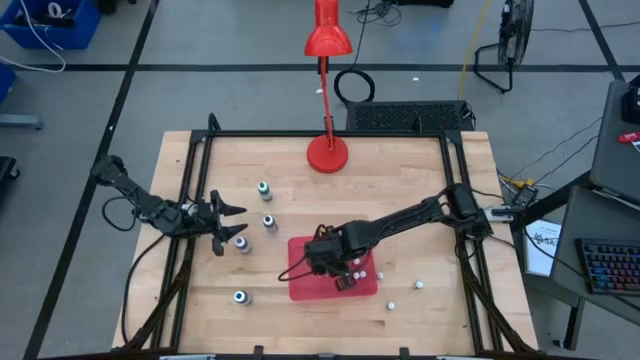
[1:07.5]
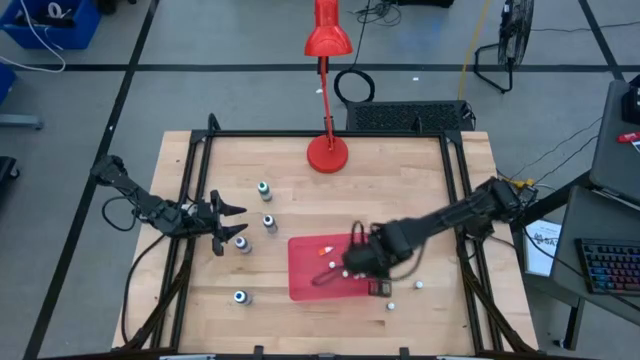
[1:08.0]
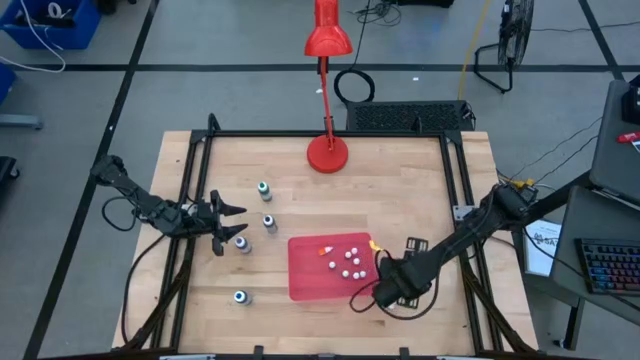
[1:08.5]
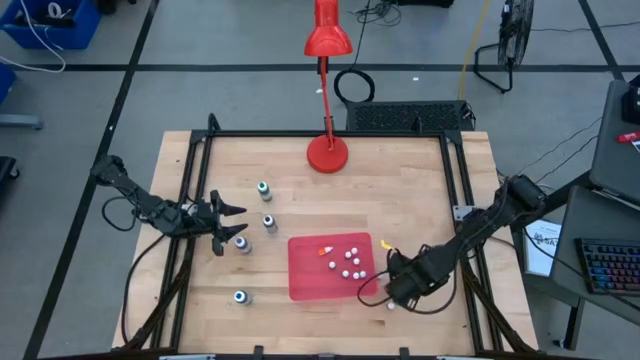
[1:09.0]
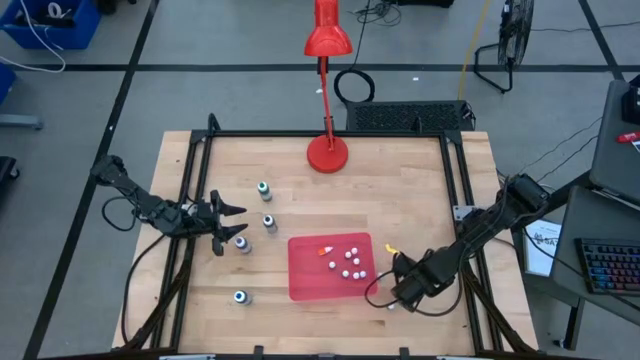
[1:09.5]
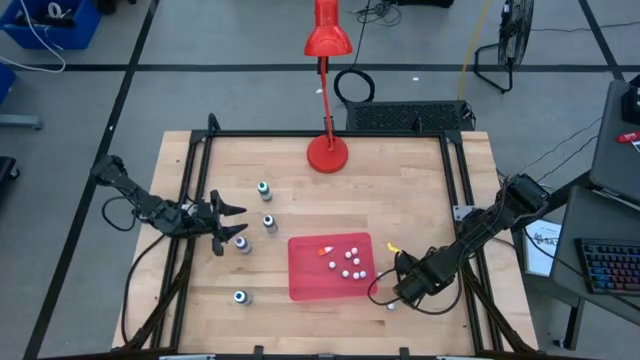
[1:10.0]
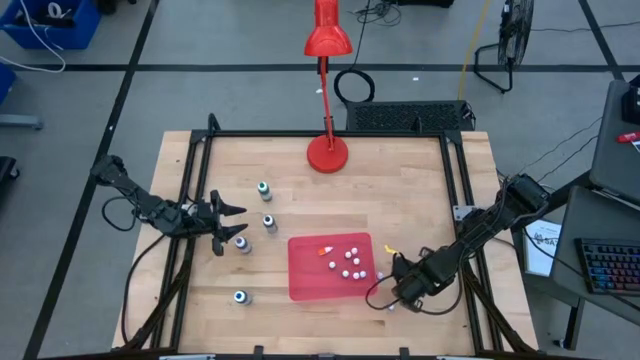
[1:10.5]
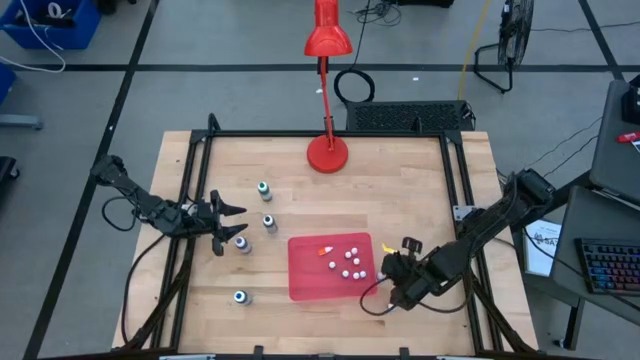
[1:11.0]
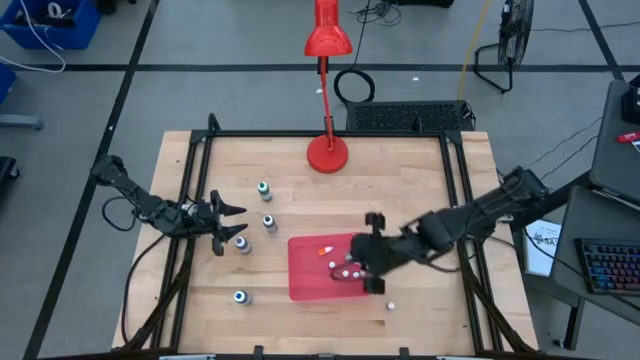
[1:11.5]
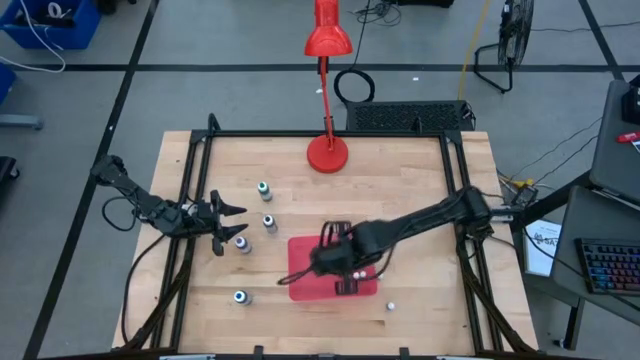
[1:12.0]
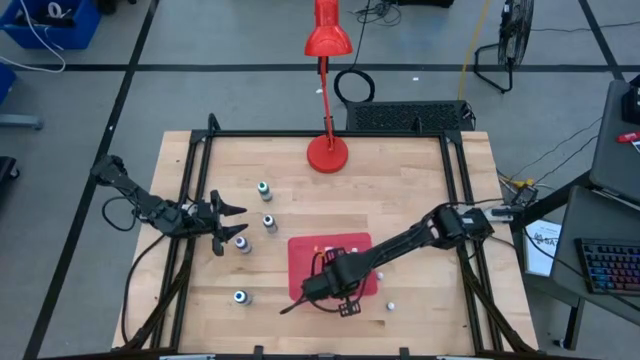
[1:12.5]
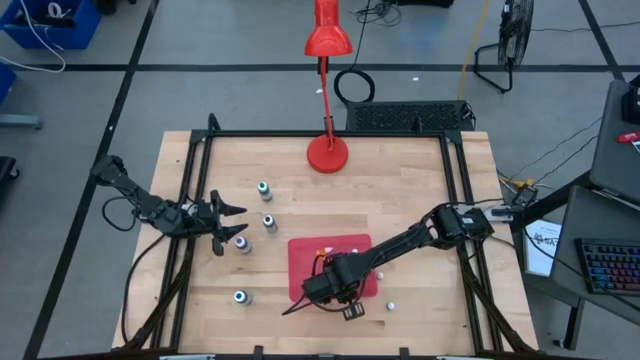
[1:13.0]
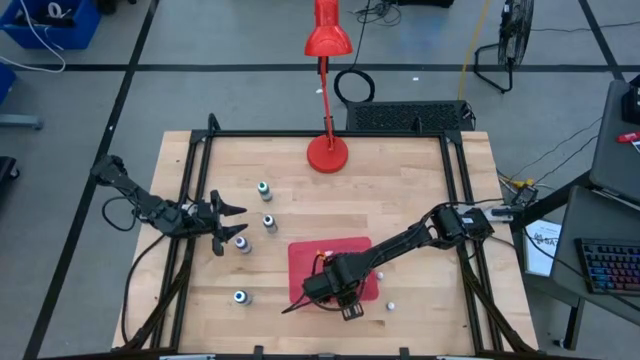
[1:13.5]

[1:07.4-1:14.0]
Task: Pick & Place food coloring
Put the small purple food coloring bottle into the pink container

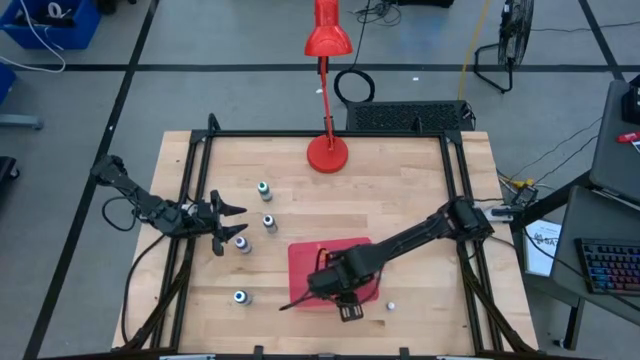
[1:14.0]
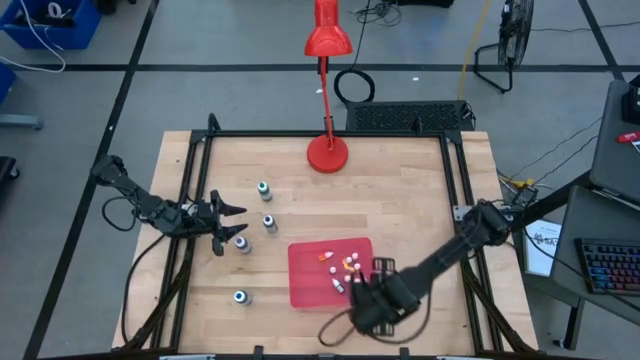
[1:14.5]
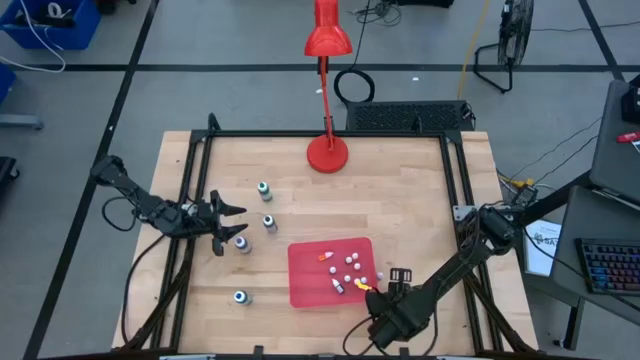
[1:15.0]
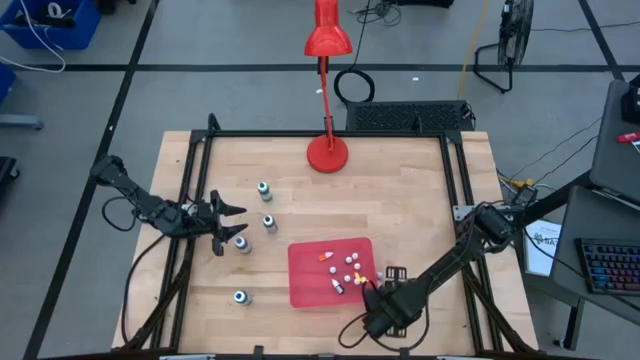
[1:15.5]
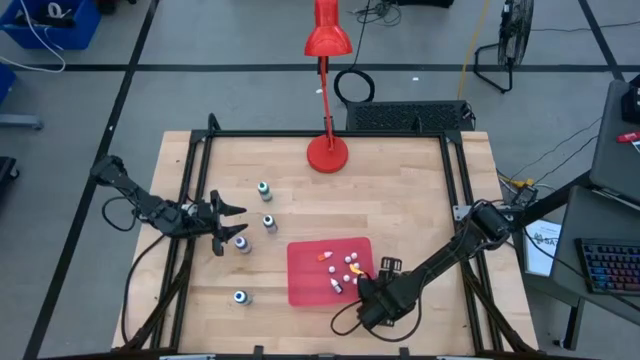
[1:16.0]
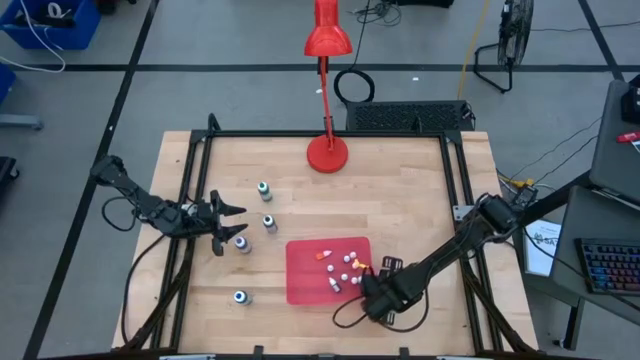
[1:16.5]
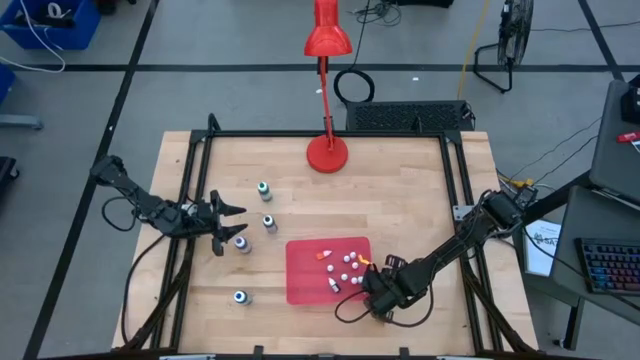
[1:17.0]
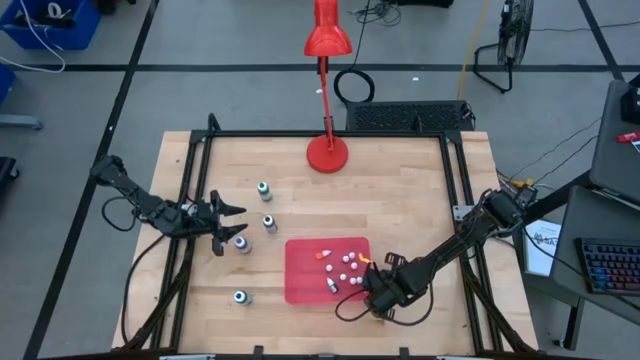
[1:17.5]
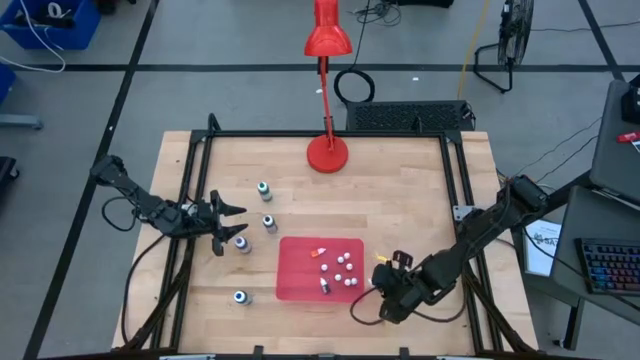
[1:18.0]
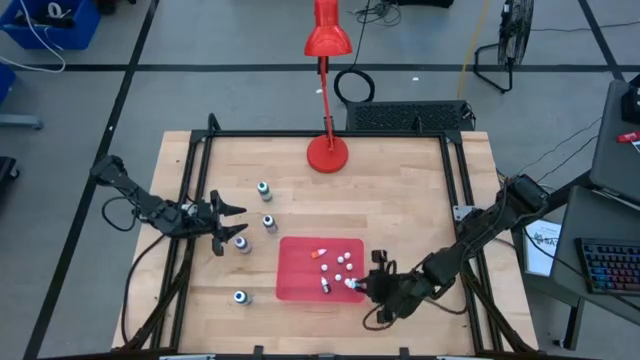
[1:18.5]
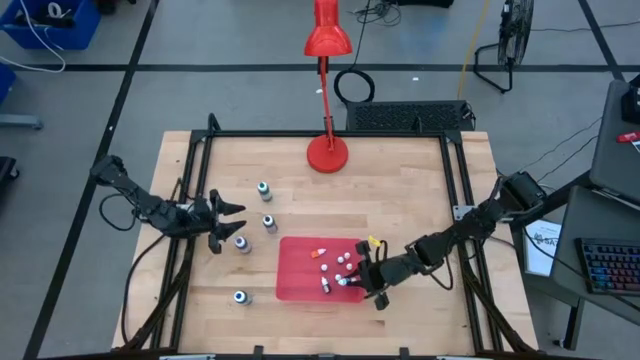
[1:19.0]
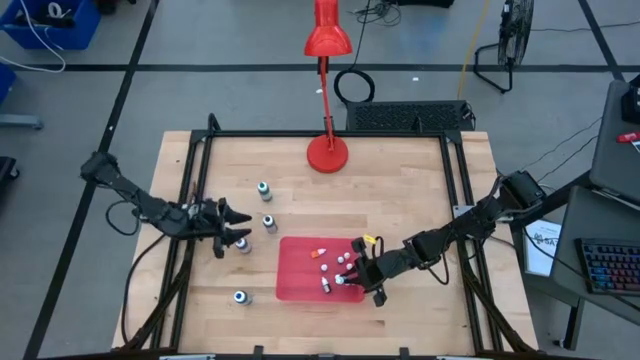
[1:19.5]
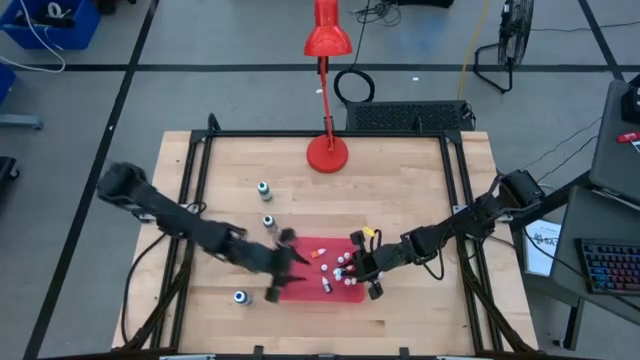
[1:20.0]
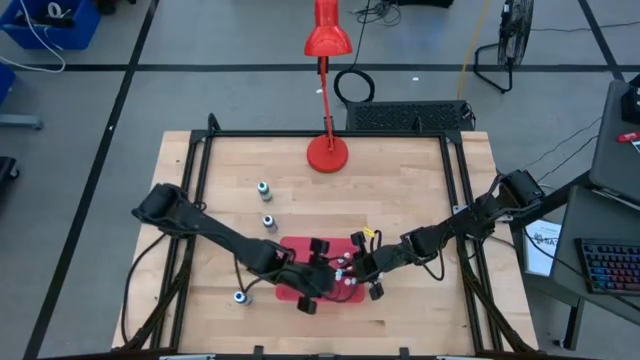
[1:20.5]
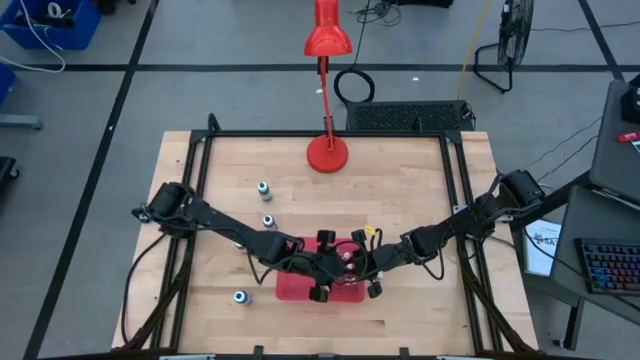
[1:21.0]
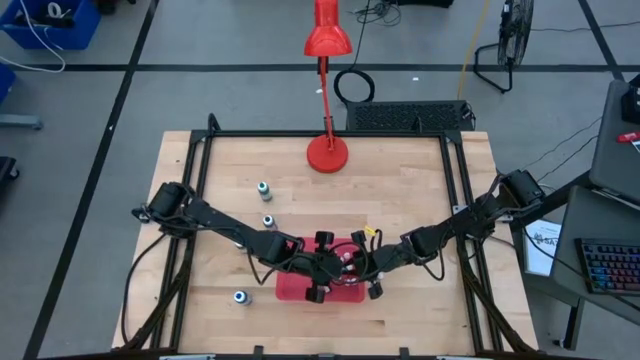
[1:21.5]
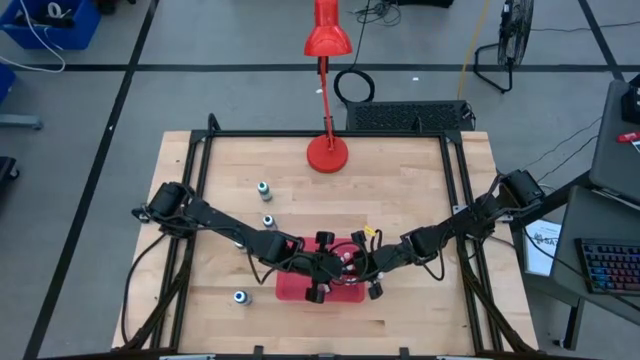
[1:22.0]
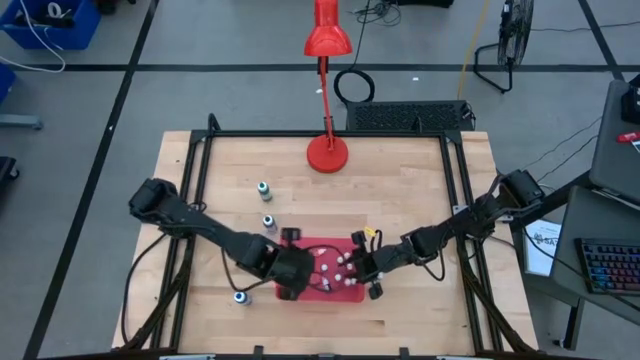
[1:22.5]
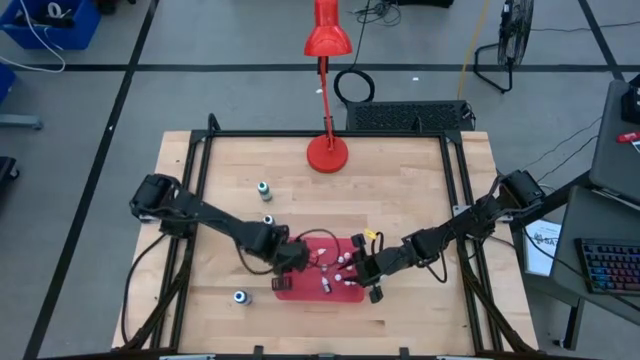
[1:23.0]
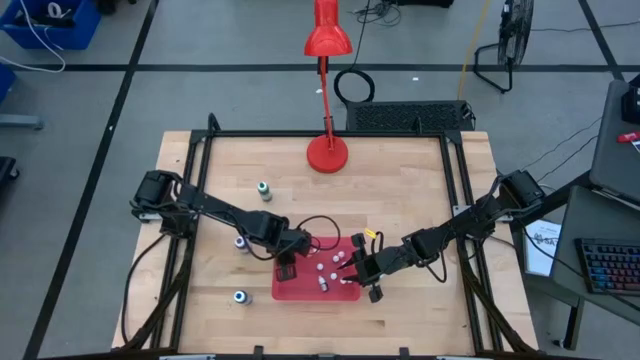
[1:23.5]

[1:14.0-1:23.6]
Put the small blue food coloring bottle into the pink container

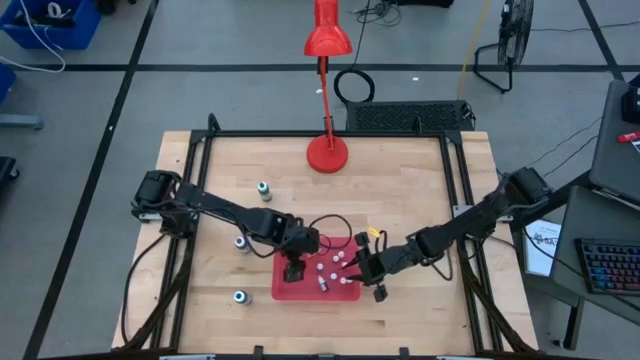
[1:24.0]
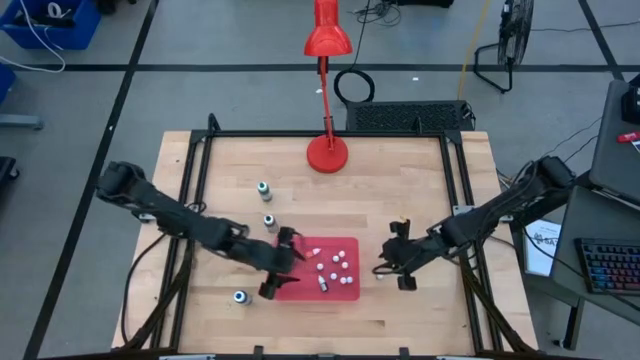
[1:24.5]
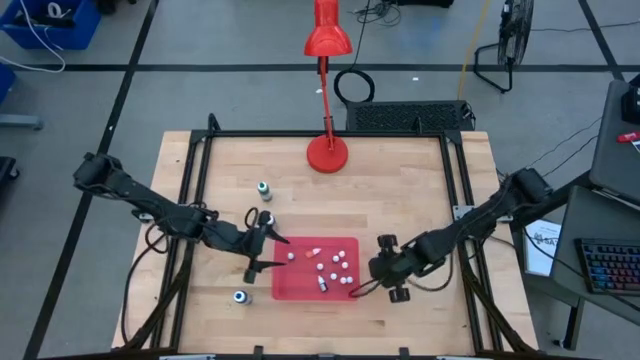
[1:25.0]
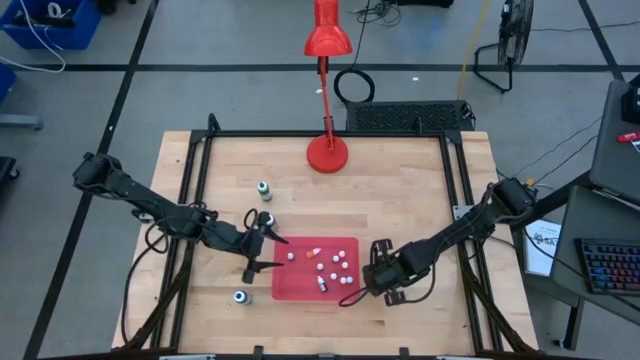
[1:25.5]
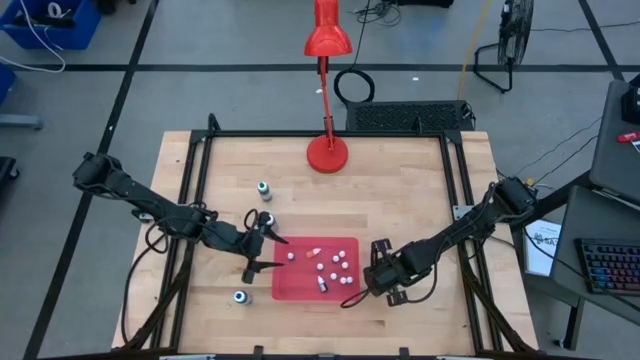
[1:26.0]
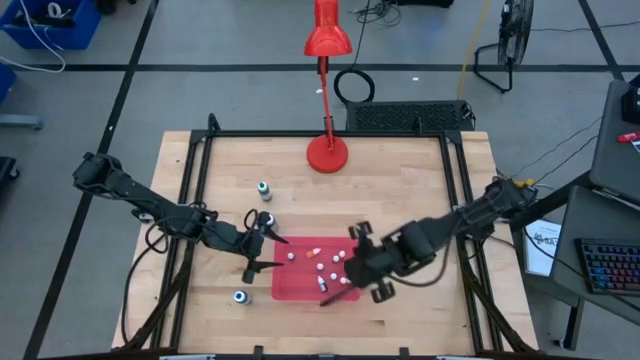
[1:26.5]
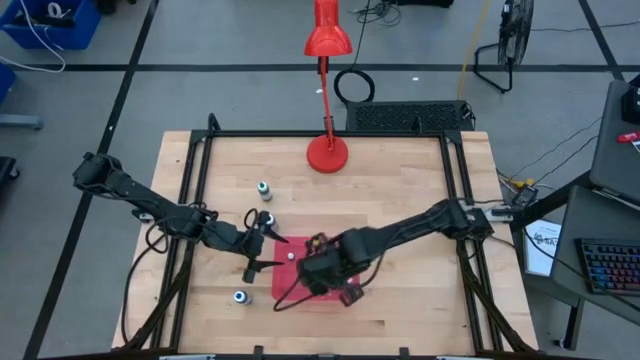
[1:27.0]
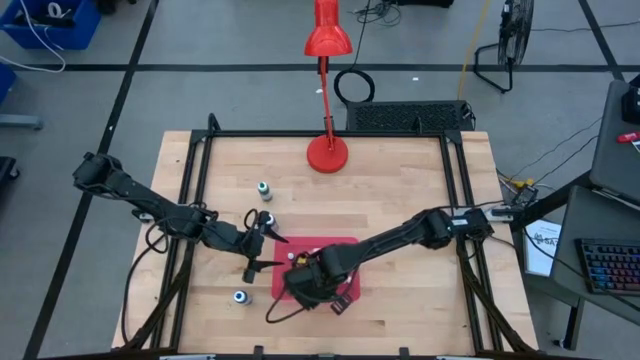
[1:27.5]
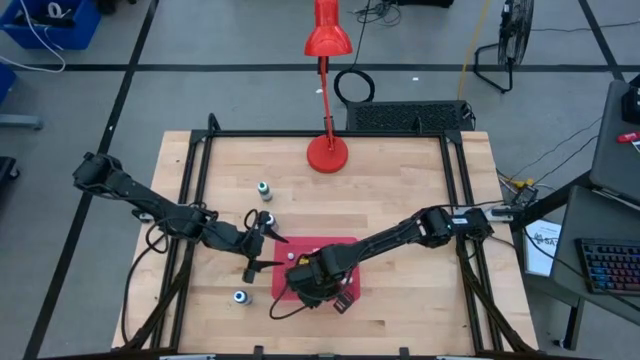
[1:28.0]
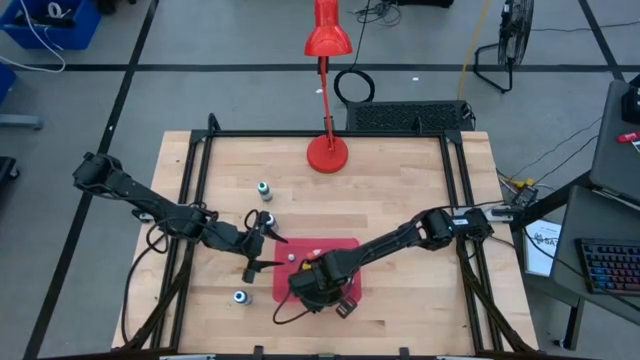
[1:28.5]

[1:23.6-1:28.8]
Put the small green food coloring bottle into the pink container
